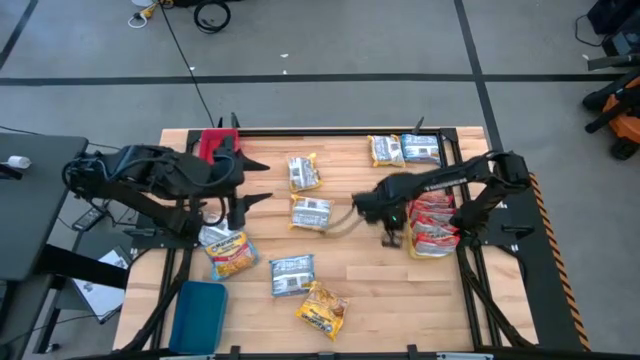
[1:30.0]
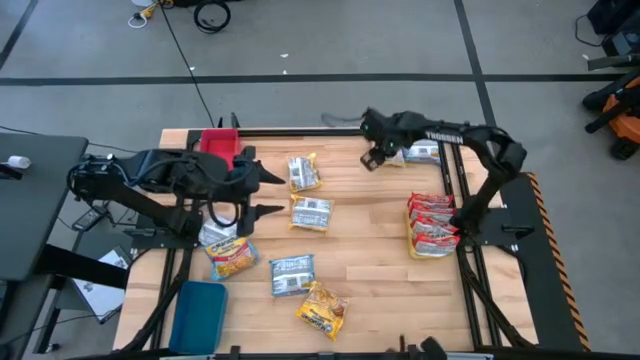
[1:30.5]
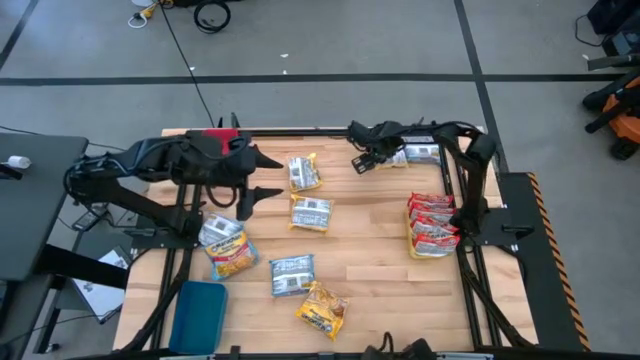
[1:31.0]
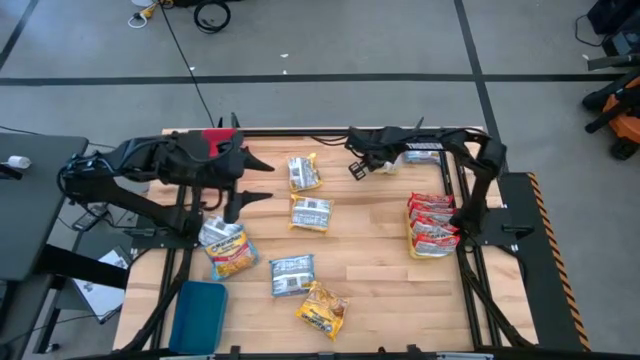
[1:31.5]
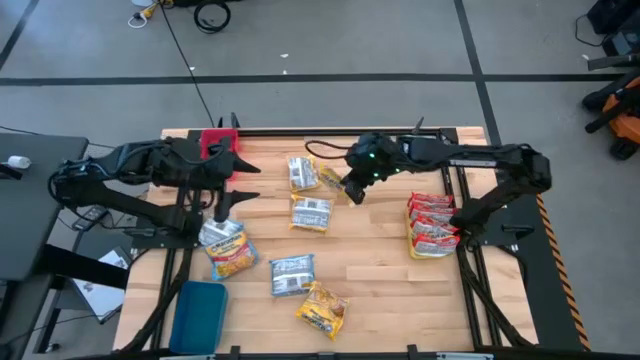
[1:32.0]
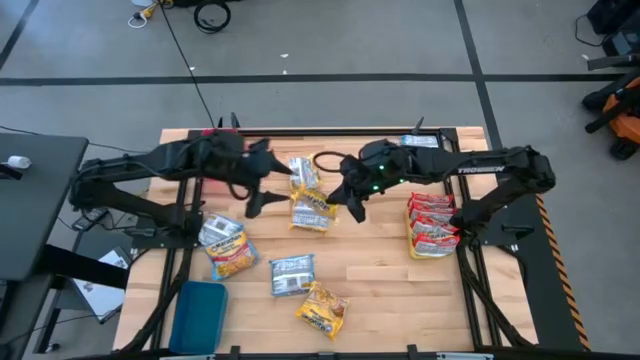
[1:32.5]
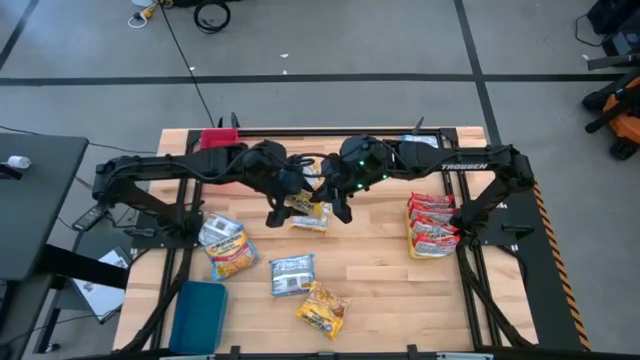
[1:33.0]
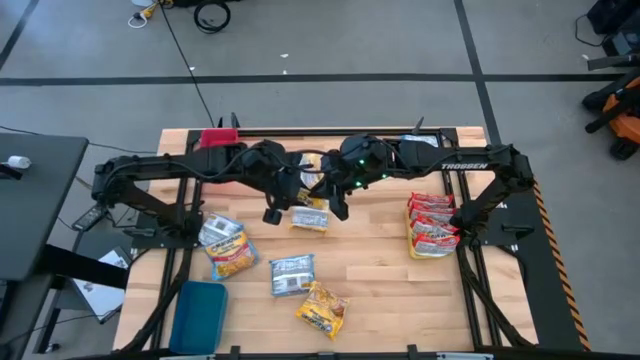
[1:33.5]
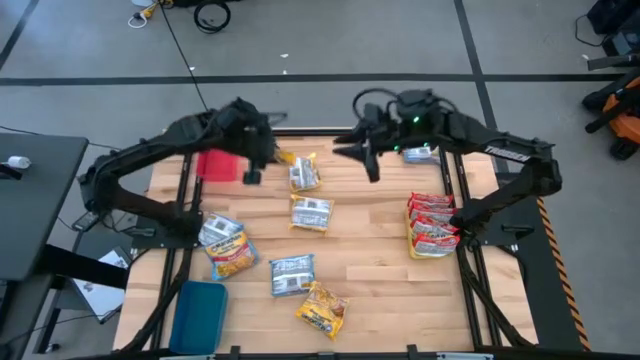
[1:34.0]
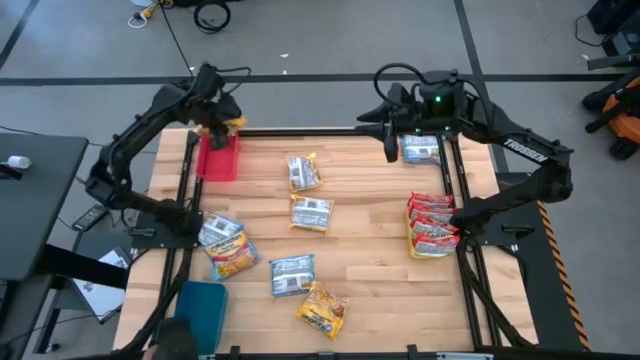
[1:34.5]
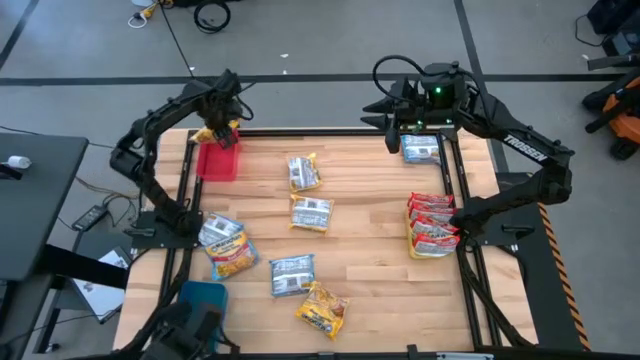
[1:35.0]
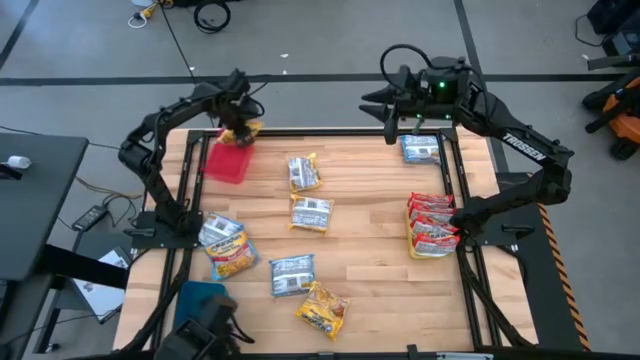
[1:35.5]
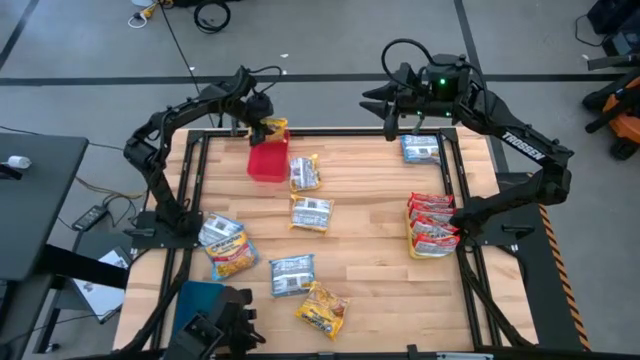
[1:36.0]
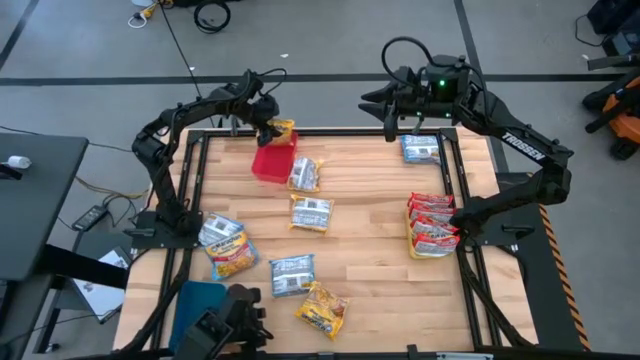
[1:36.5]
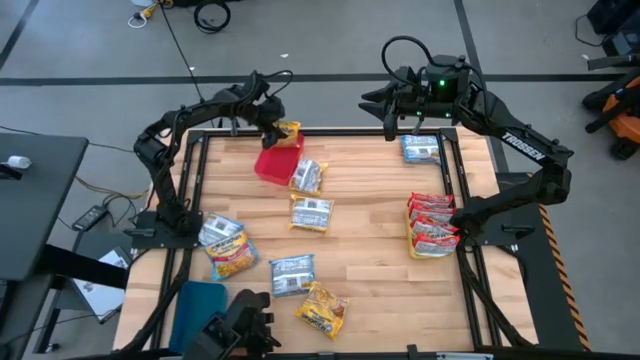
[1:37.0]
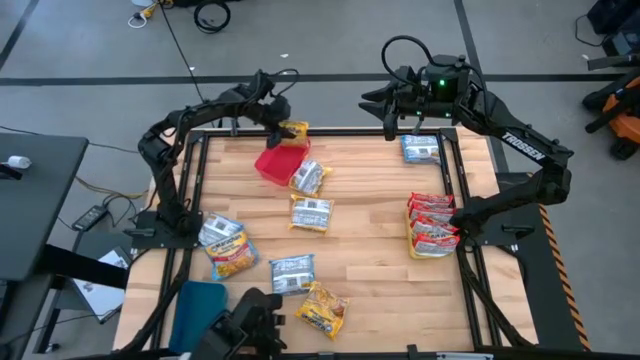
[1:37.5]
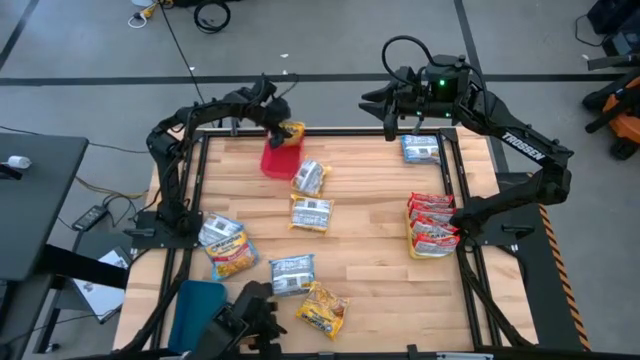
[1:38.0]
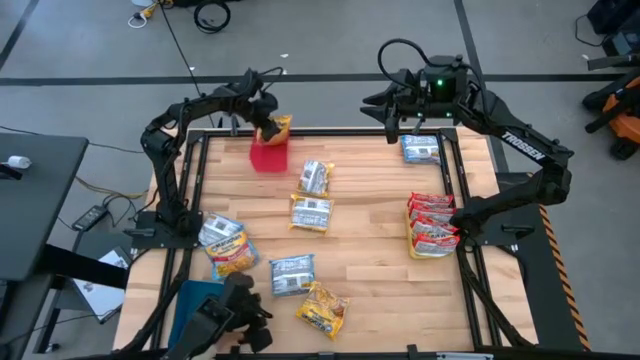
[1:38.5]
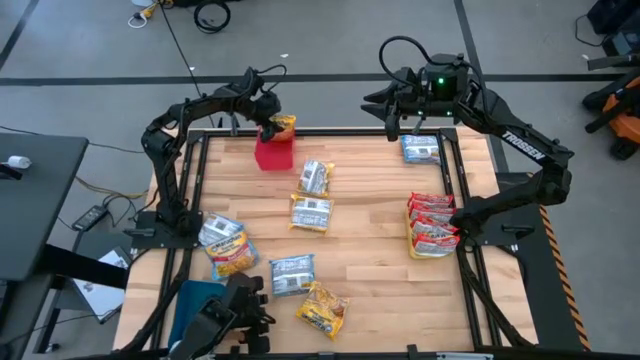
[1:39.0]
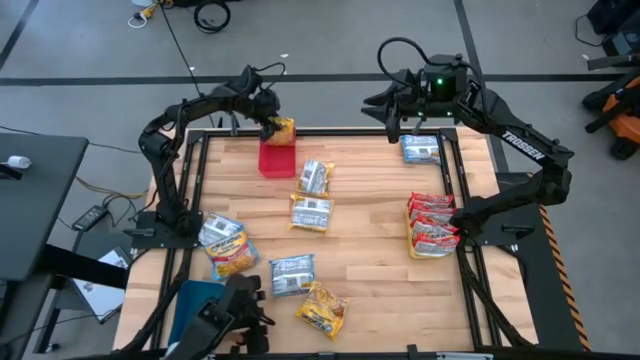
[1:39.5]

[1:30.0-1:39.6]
Task: Sort Maruchan noodles
Put the yellow noodle pack into the pink bin

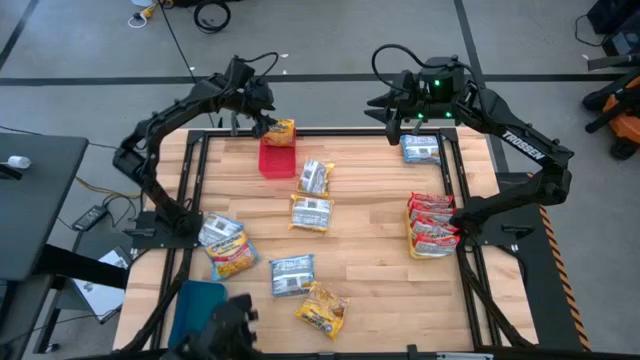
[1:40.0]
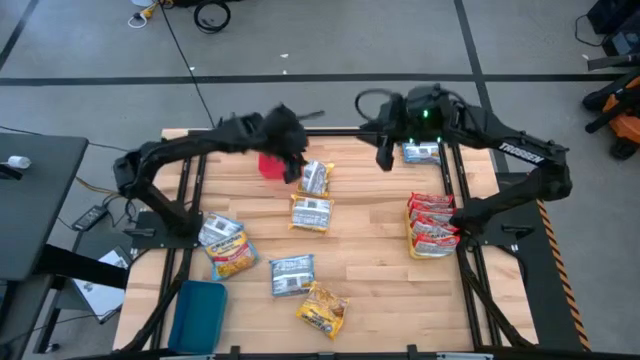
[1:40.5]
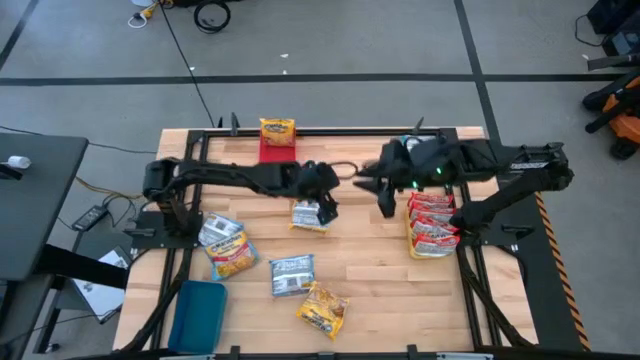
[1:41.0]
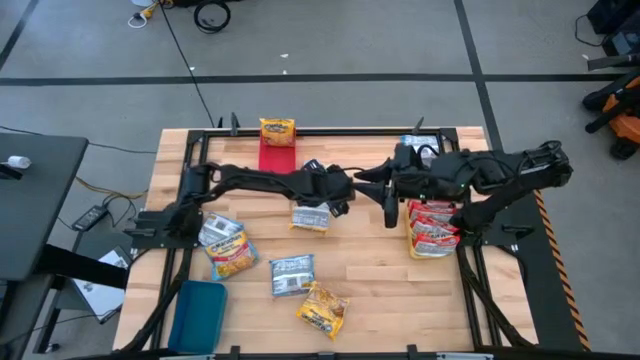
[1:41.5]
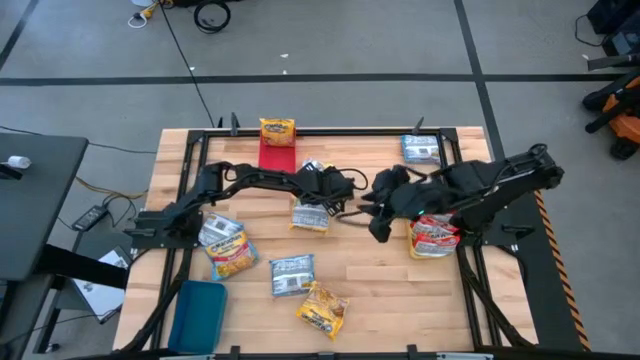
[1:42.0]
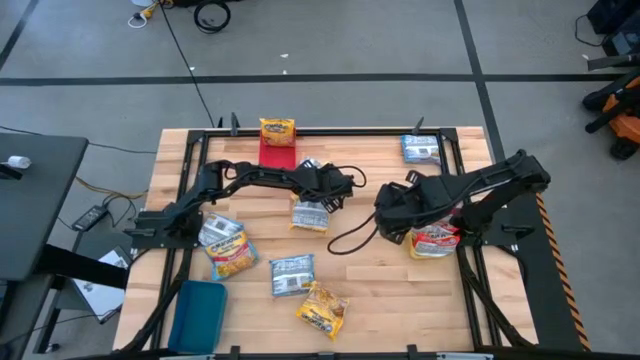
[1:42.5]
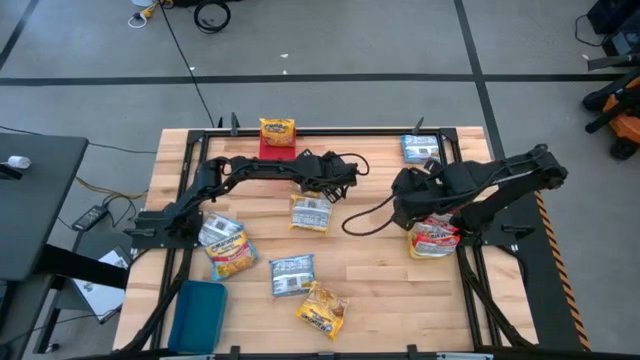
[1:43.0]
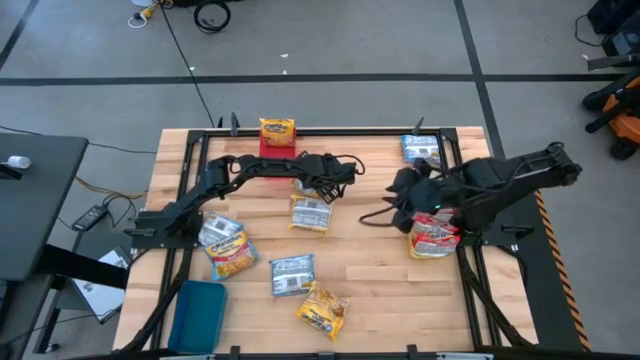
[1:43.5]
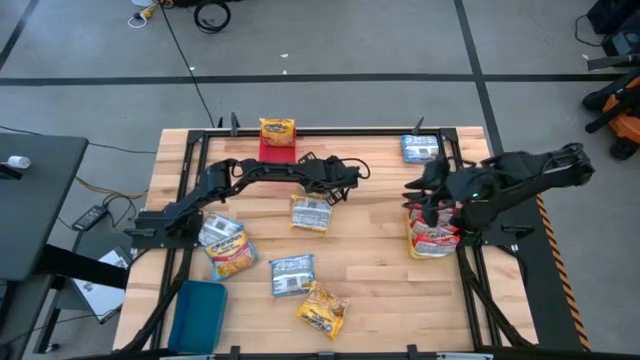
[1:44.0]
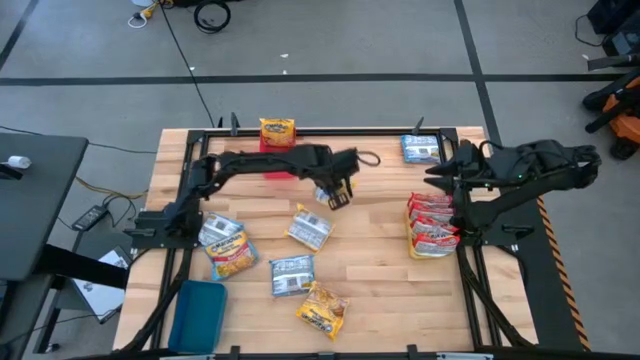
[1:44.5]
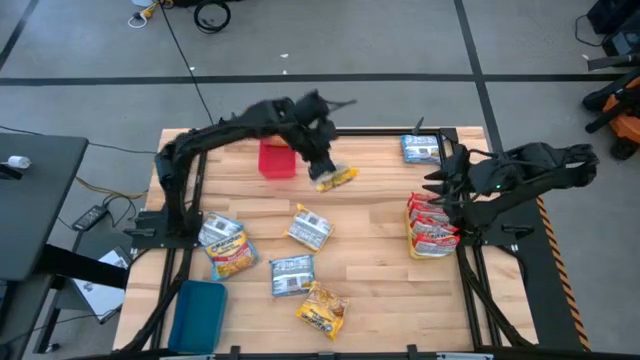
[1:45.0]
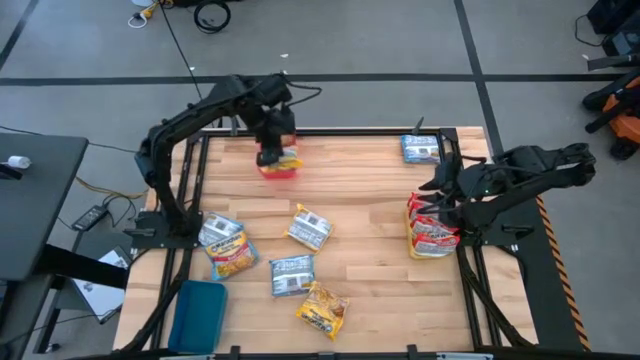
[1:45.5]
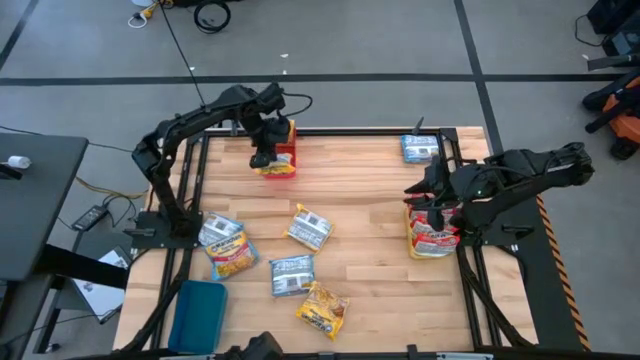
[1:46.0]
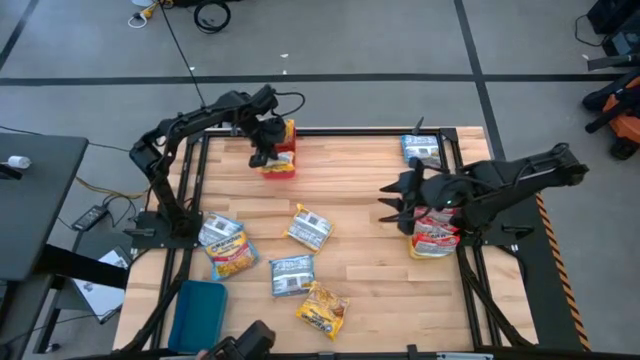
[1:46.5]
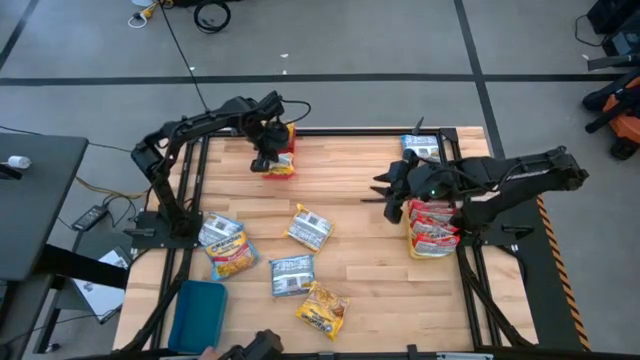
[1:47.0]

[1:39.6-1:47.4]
Put the yellow noodle pack into the pink bin

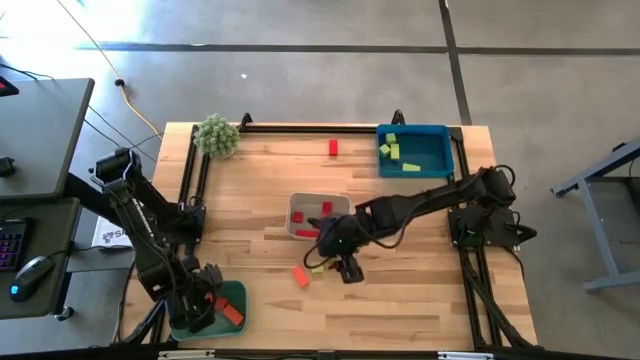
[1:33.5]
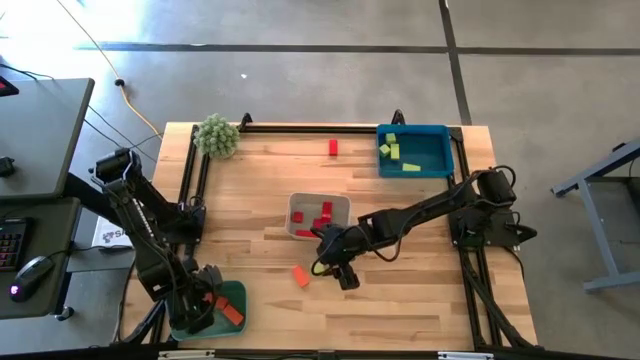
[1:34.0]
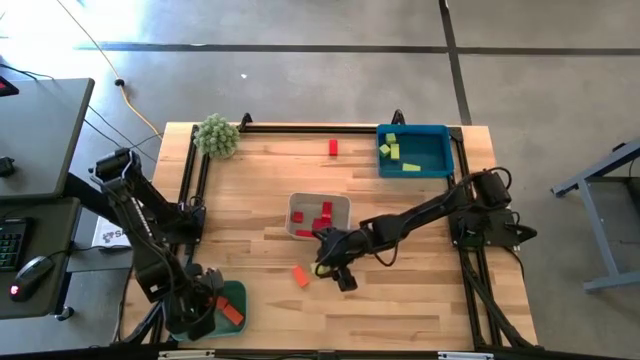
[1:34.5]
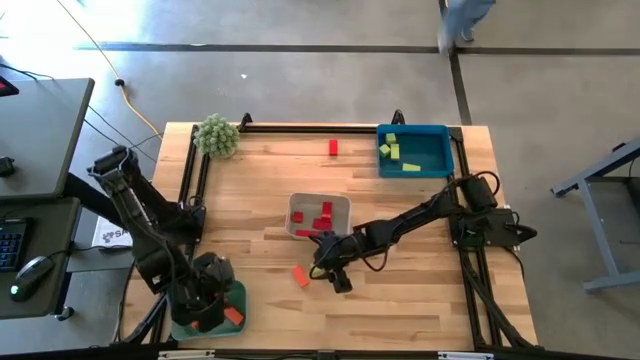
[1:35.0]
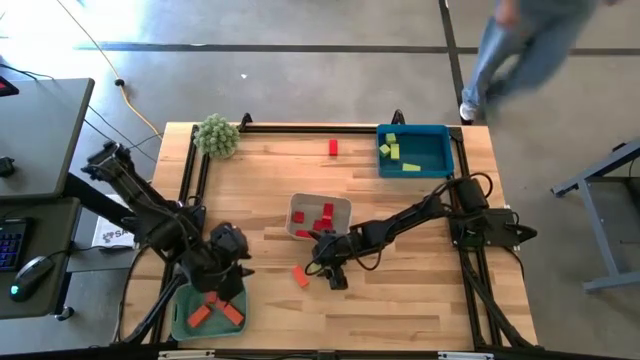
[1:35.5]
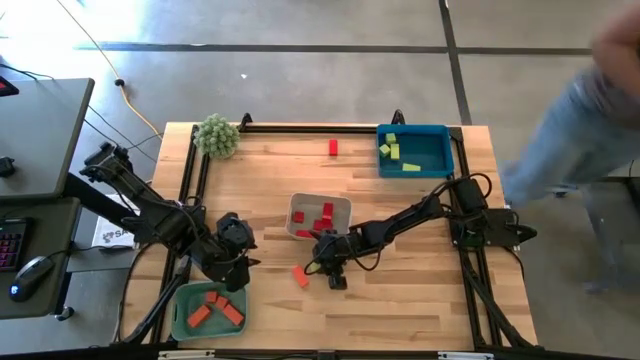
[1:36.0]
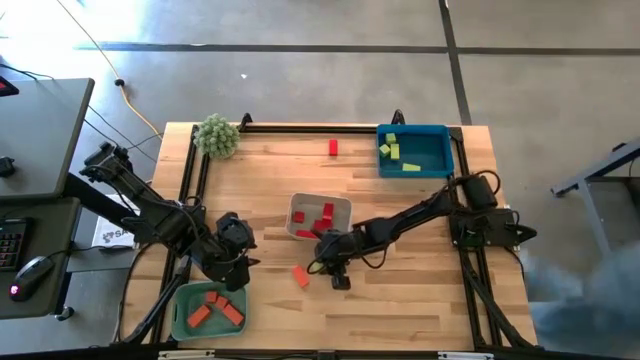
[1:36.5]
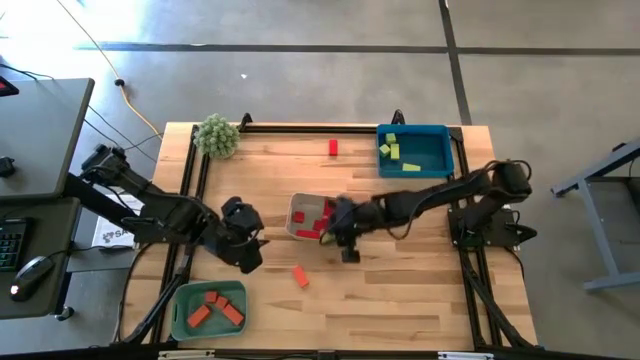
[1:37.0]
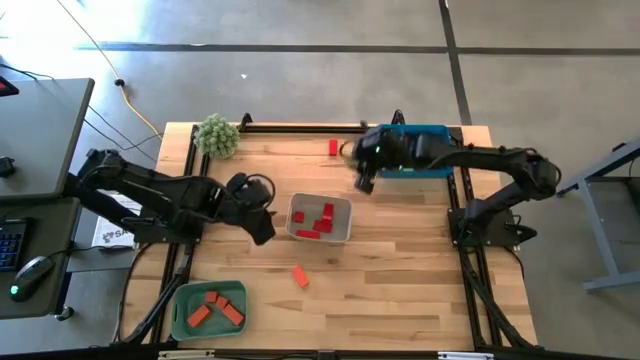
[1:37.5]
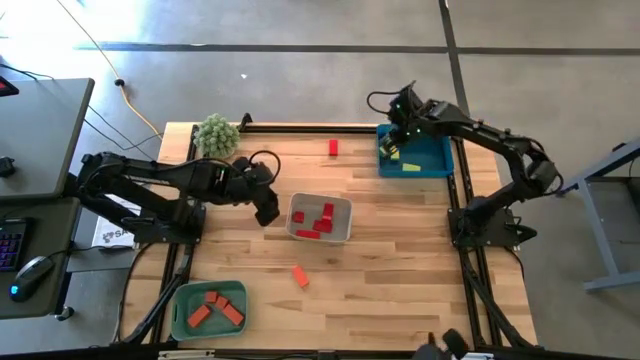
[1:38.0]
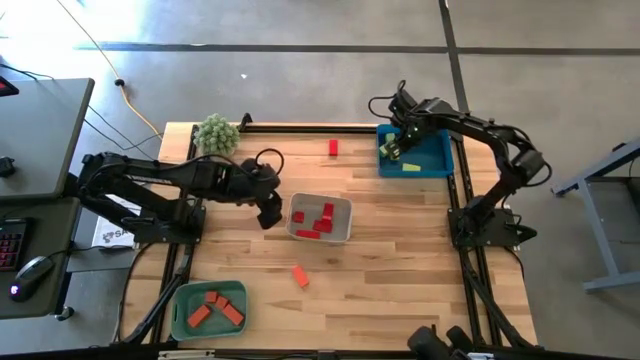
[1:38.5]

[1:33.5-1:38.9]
Task: Sort & place blocks by color
Put the green wooden block into the blue bin
